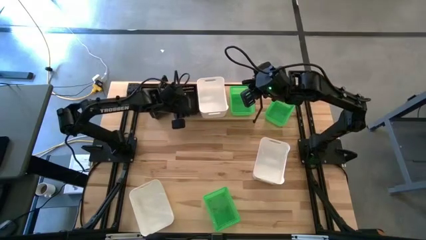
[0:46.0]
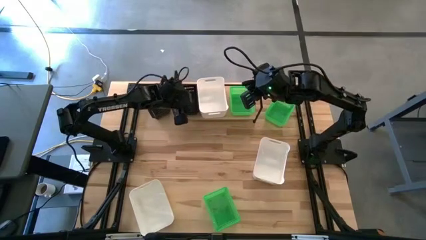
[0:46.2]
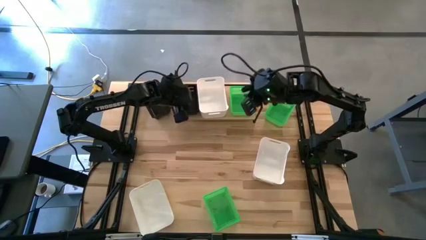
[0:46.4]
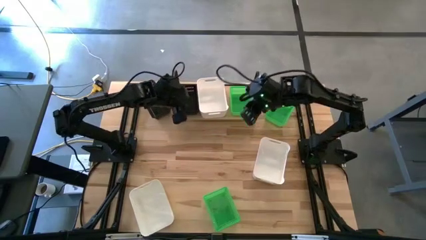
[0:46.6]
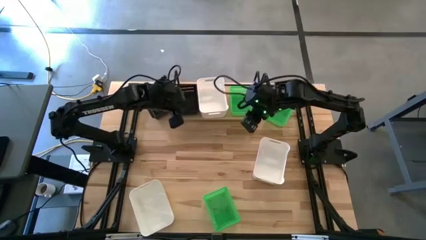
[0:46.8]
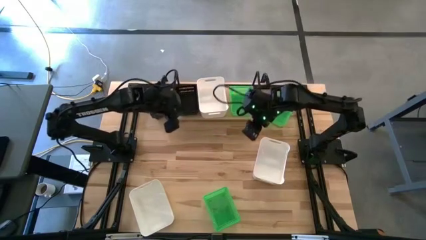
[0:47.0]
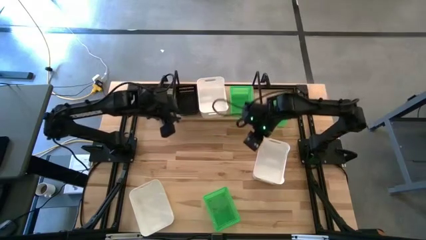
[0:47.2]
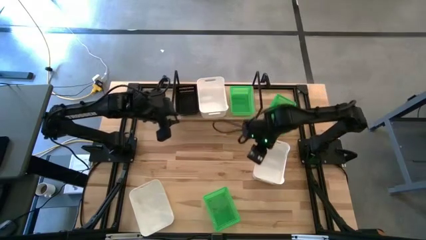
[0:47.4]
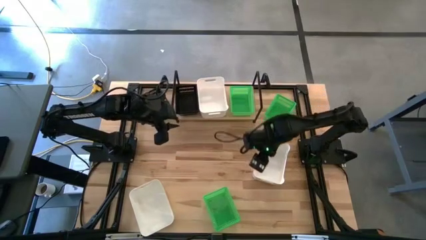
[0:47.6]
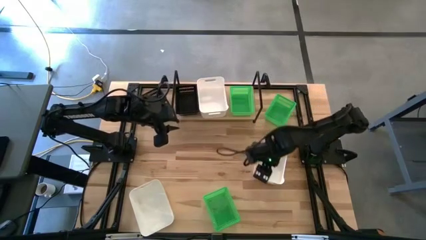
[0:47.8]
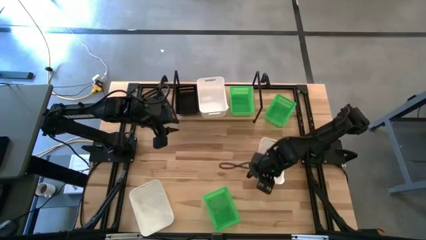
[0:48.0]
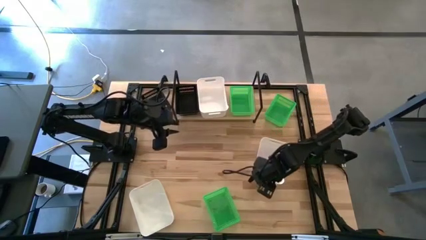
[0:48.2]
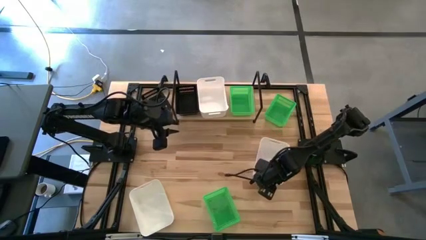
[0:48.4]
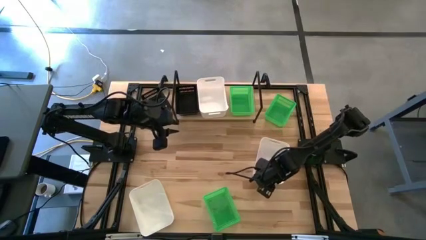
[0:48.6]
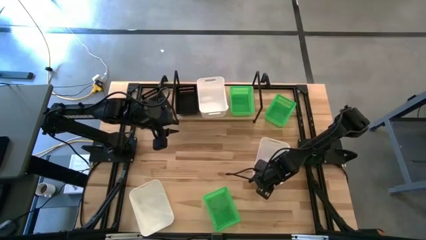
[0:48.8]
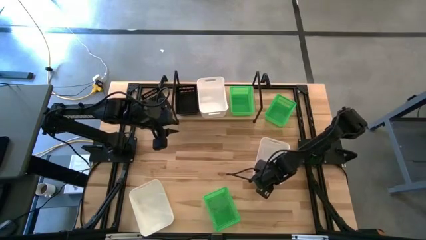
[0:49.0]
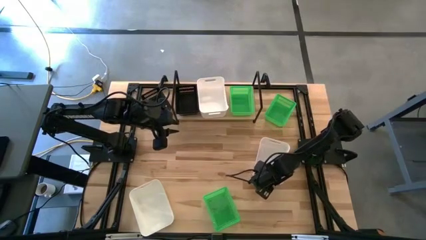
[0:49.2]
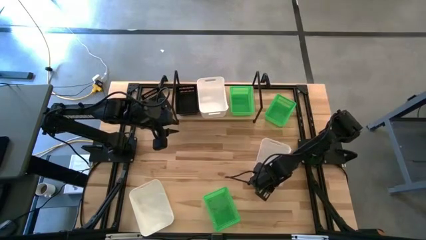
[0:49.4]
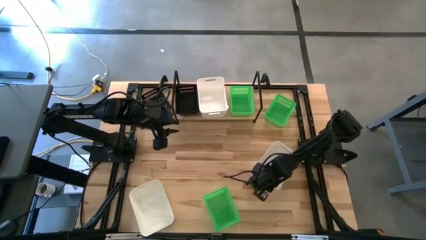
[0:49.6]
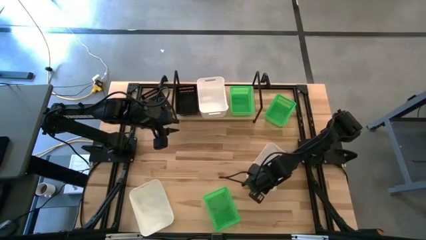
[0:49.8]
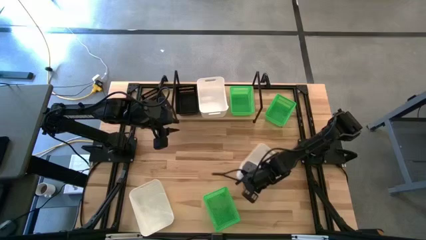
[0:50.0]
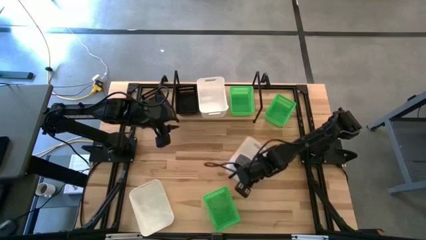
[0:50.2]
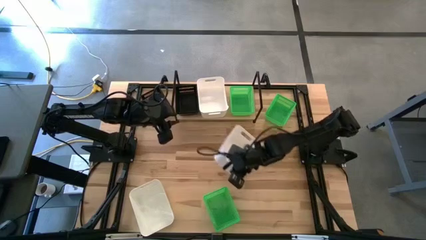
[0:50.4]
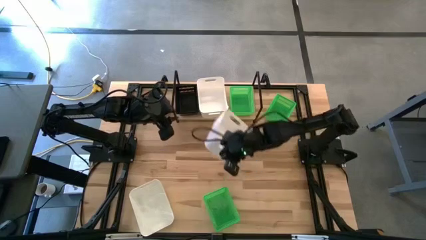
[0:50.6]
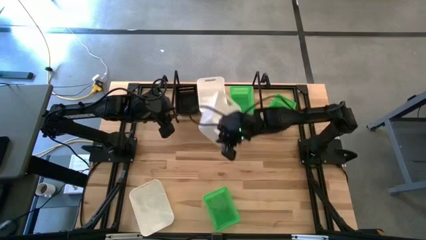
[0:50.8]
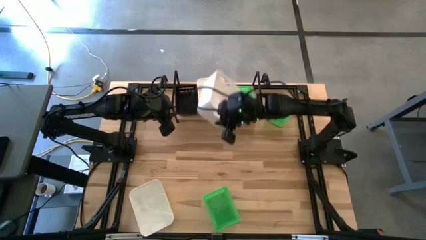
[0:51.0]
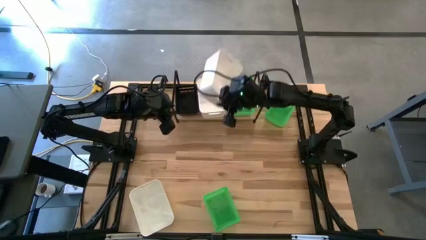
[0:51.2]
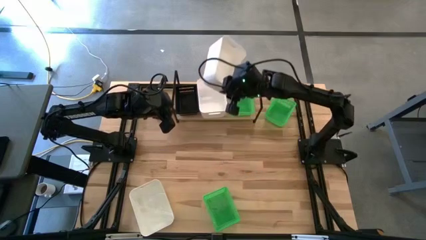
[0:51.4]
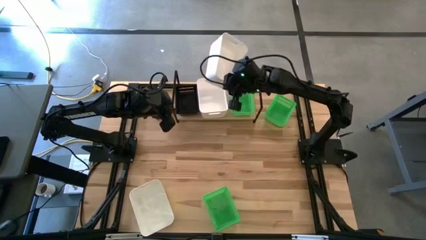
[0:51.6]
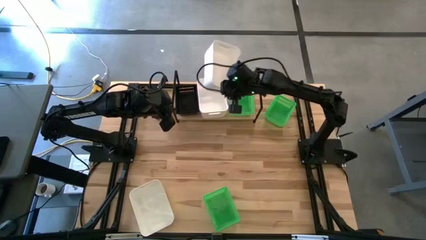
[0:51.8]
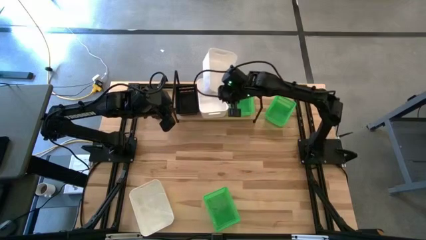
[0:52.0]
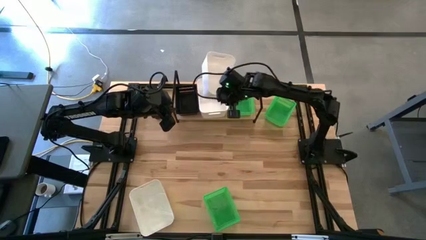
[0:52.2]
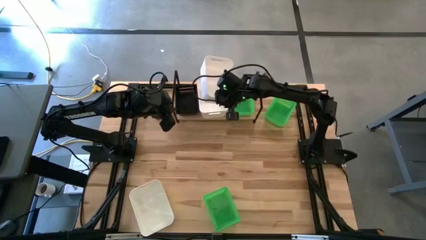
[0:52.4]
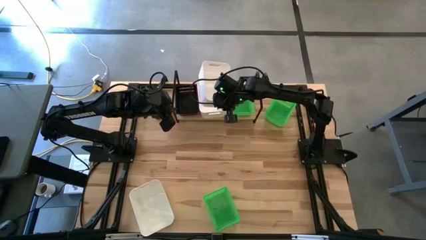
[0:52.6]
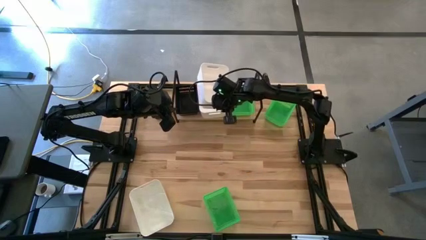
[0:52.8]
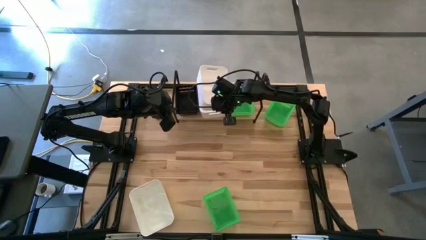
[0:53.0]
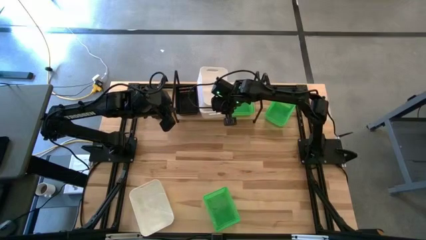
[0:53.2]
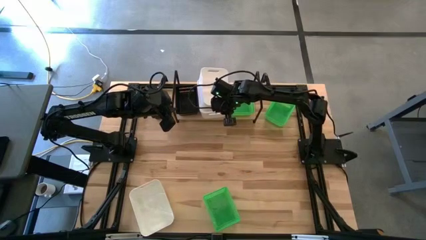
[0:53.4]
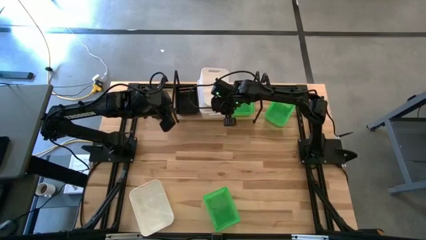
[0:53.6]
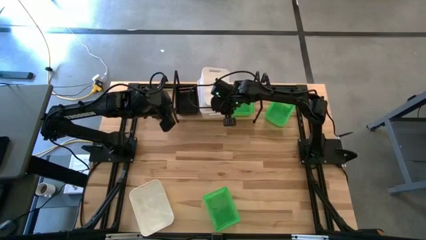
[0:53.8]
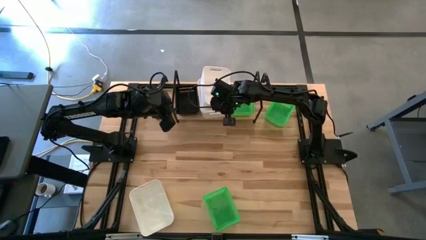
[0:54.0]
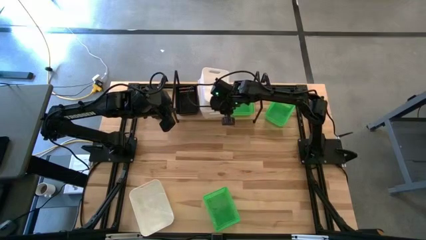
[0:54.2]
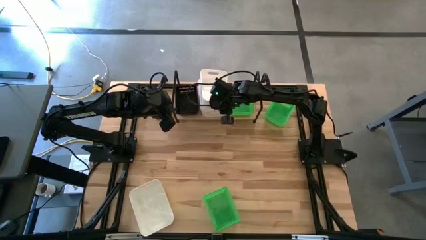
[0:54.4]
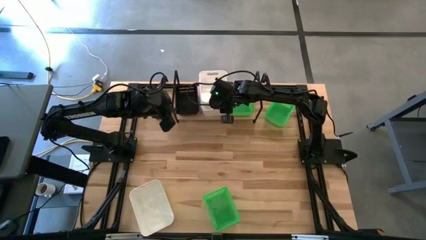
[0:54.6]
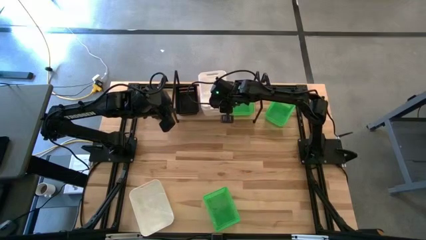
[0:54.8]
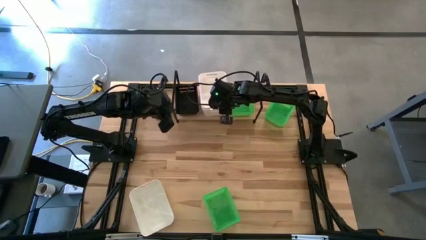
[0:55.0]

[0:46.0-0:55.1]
Task: Stack baskets on shelf by color
Stack the top right white bin on top of the white bin on the shelf

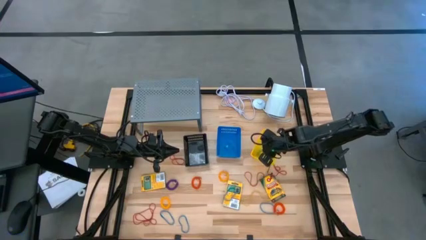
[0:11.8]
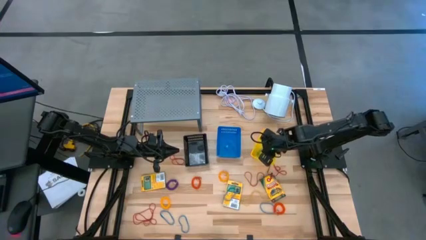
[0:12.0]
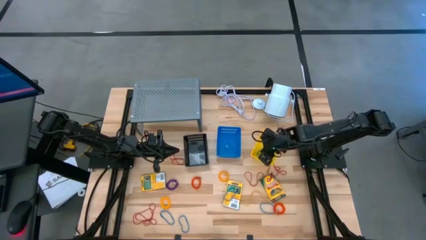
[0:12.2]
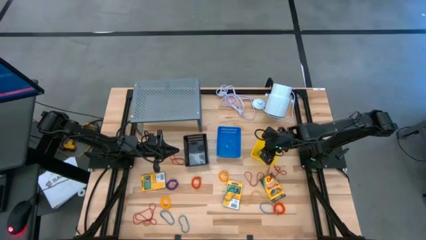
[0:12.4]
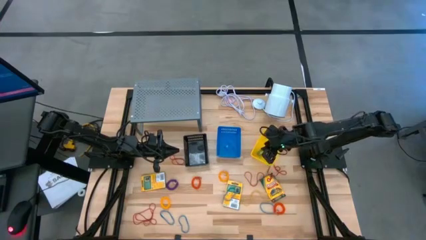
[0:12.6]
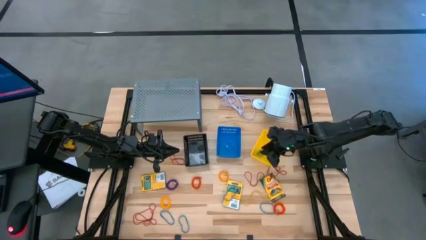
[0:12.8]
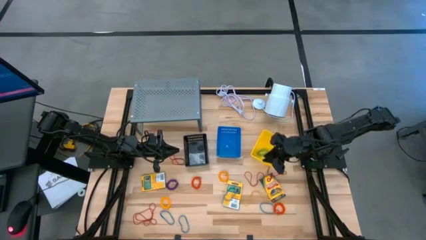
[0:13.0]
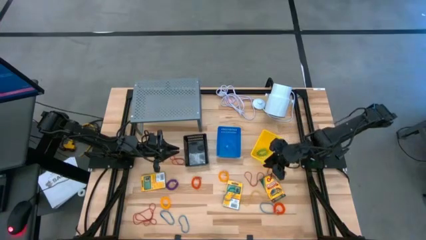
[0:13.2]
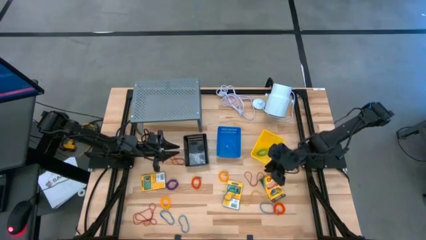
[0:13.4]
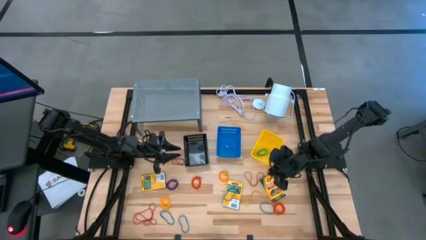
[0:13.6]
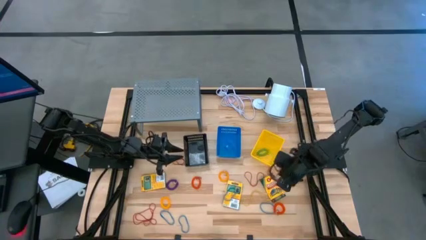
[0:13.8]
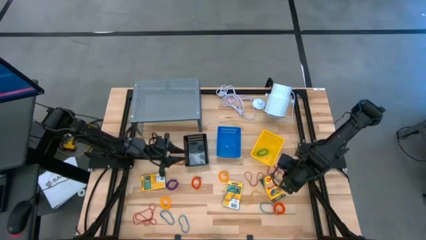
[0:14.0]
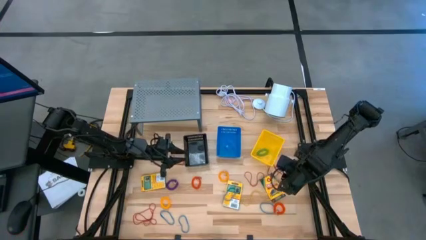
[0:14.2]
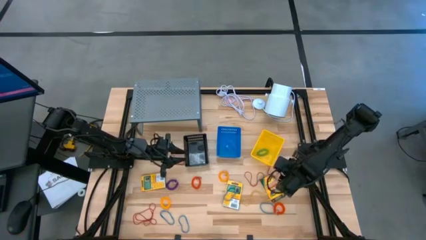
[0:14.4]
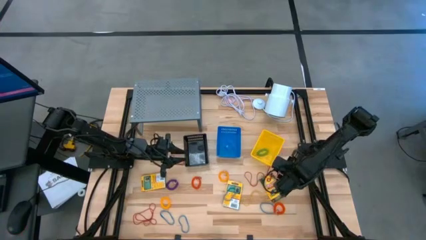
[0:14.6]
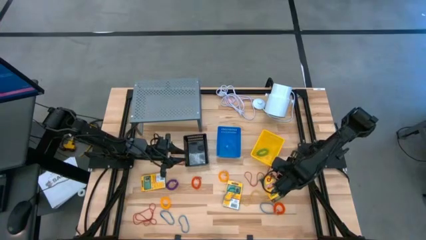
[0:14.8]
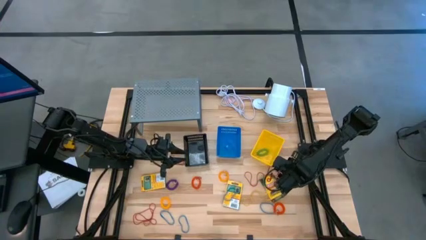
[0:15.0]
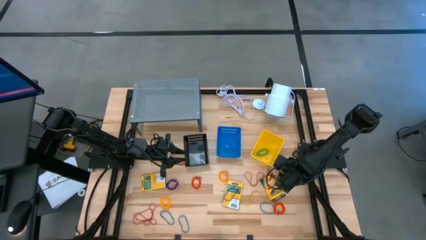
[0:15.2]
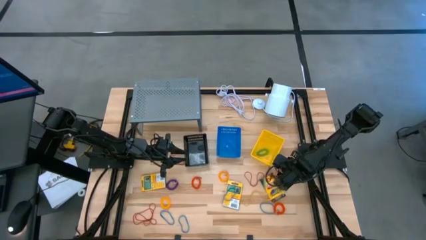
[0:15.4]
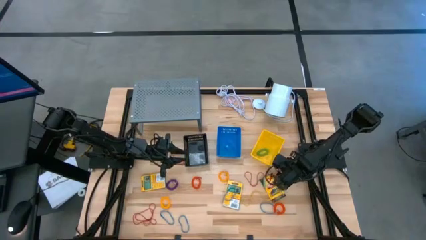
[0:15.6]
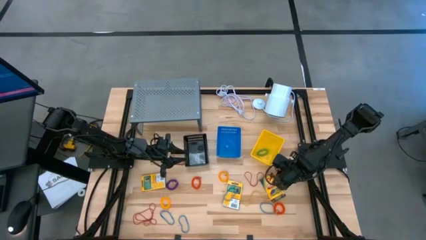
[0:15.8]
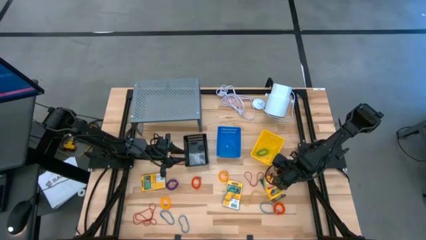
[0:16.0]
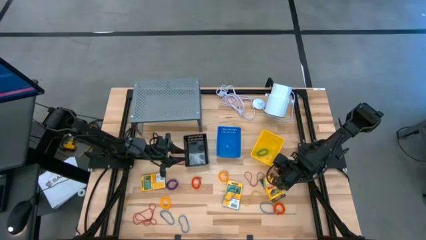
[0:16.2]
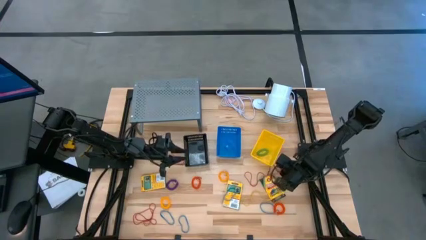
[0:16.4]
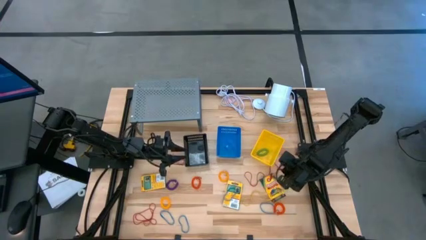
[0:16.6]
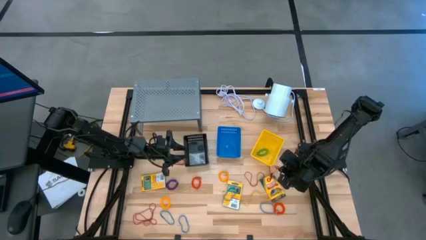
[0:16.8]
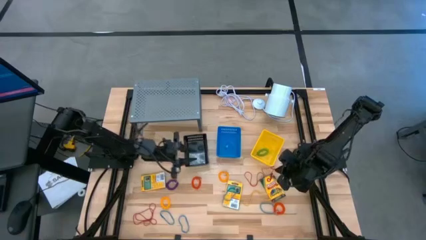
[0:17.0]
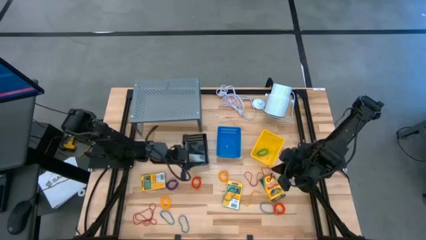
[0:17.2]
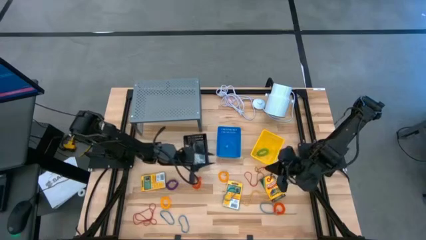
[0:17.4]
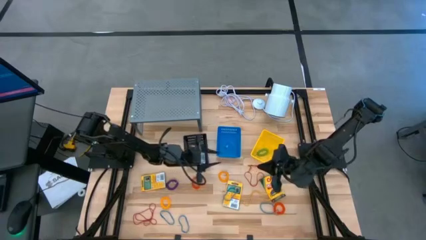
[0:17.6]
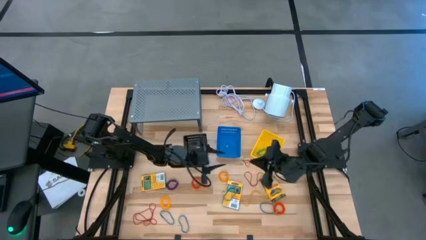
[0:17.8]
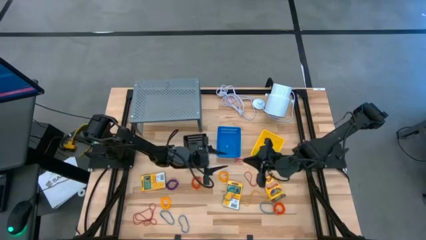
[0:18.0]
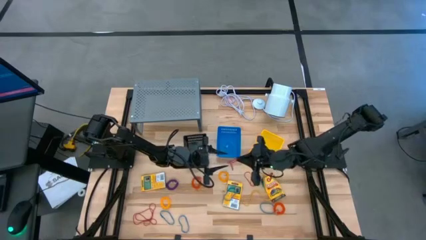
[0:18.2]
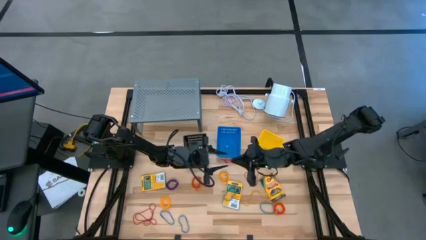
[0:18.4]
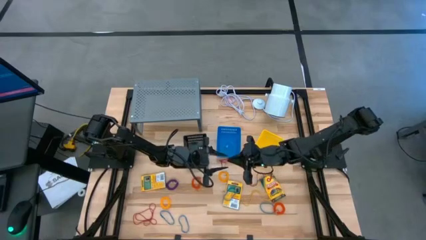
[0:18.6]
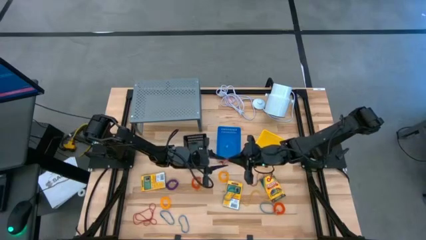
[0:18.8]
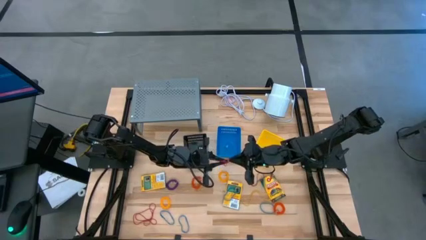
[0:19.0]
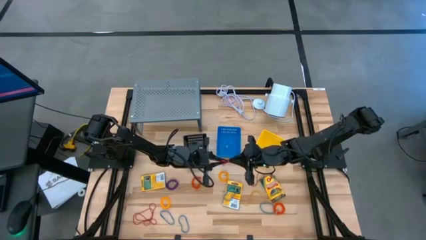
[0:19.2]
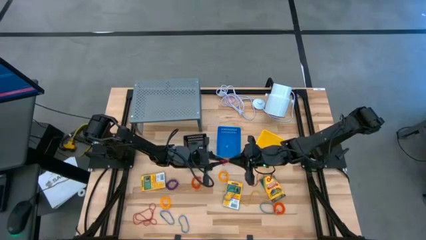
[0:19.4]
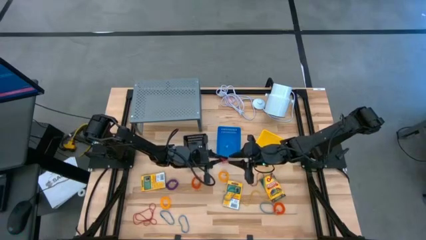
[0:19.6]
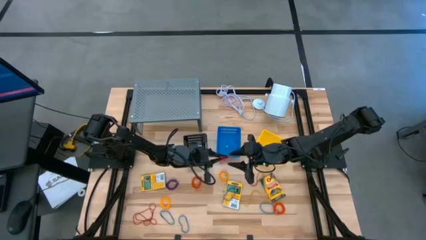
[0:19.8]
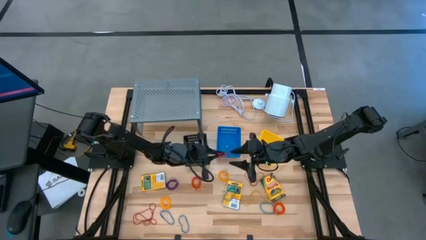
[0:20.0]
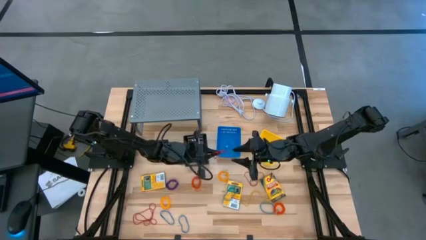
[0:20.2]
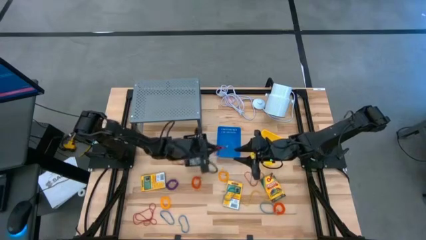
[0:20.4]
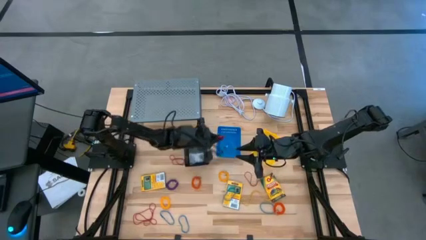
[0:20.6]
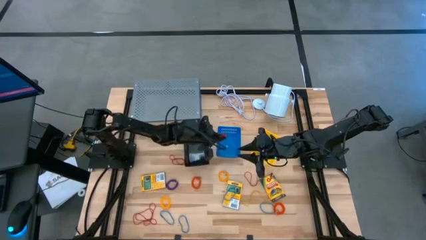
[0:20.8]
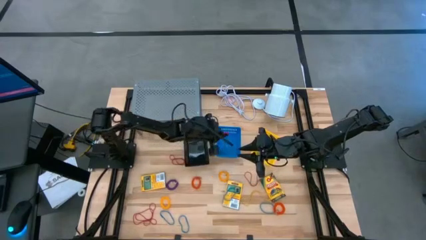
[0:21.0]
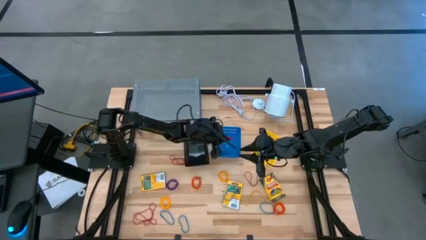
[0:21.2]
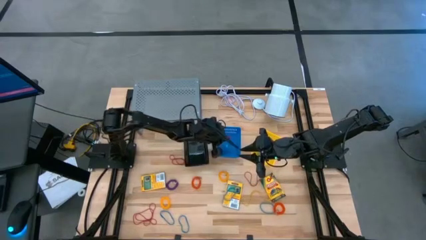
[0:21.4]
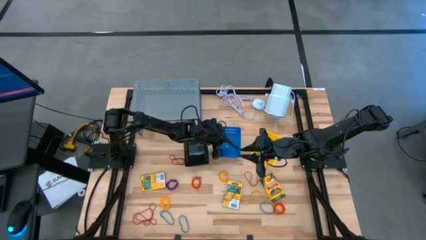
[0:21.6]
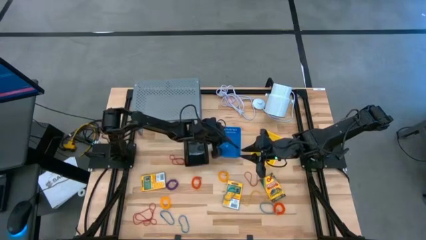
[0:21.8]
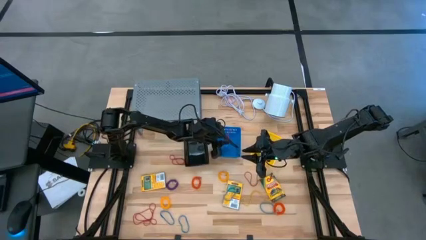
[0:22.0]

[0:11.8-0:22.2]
Task: Pick & Place Office Desk Supplies
Put the red rubber band into the blue basket
